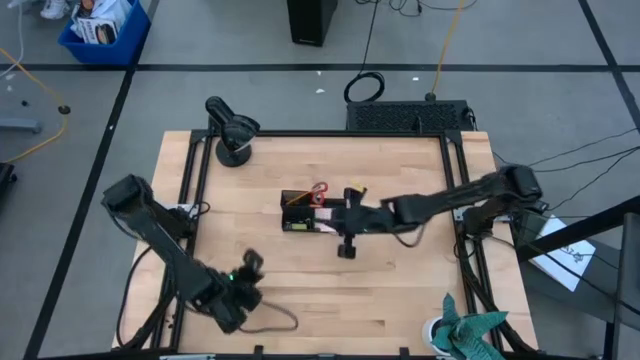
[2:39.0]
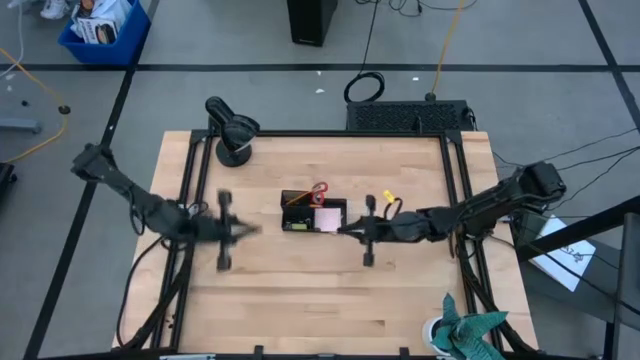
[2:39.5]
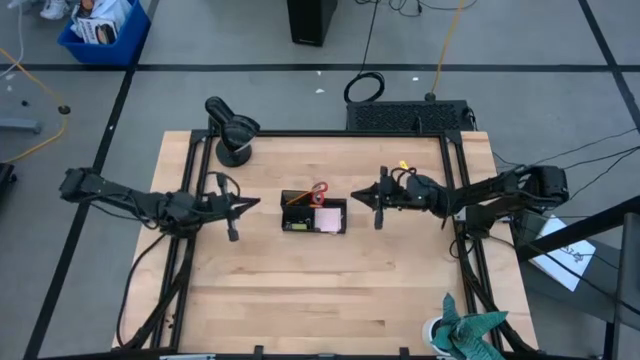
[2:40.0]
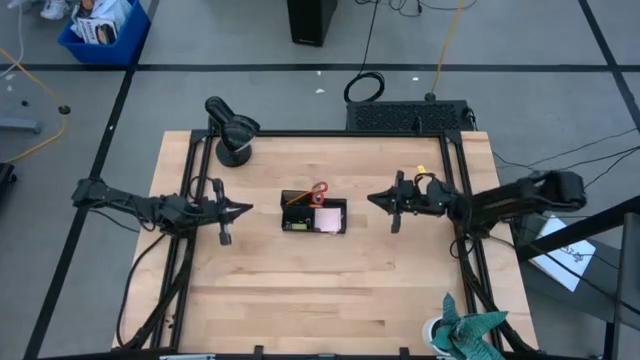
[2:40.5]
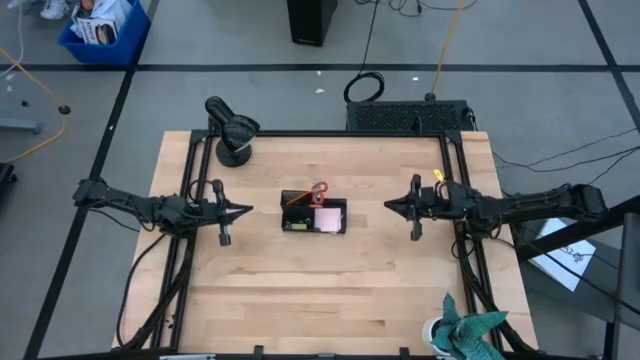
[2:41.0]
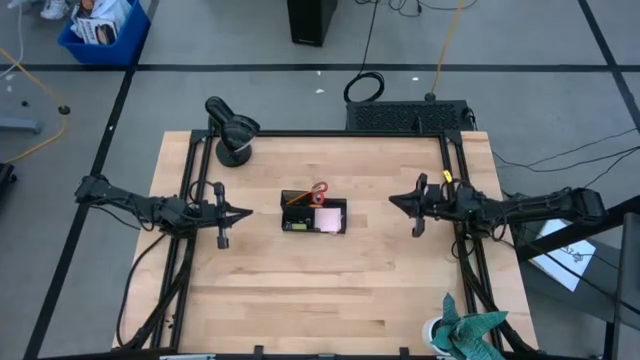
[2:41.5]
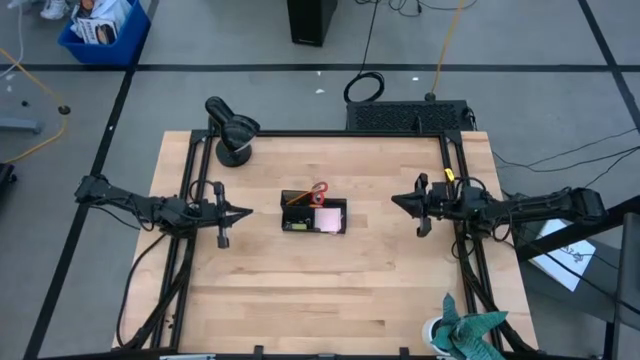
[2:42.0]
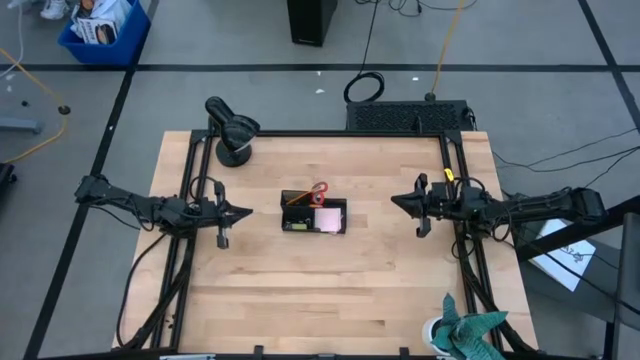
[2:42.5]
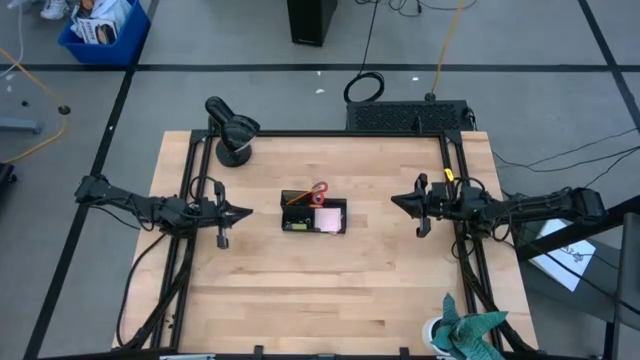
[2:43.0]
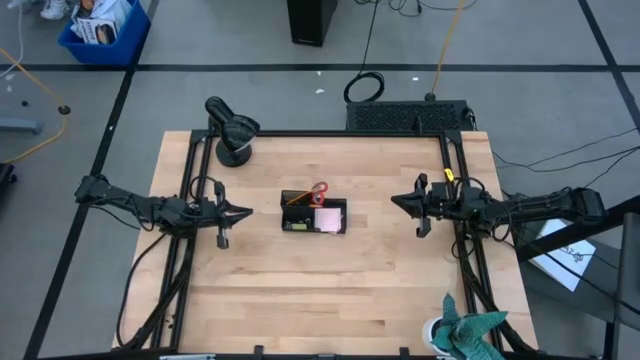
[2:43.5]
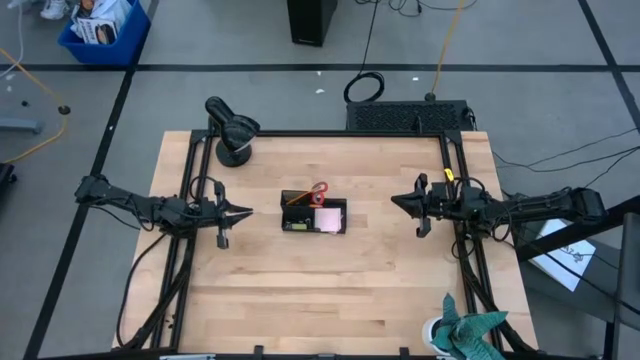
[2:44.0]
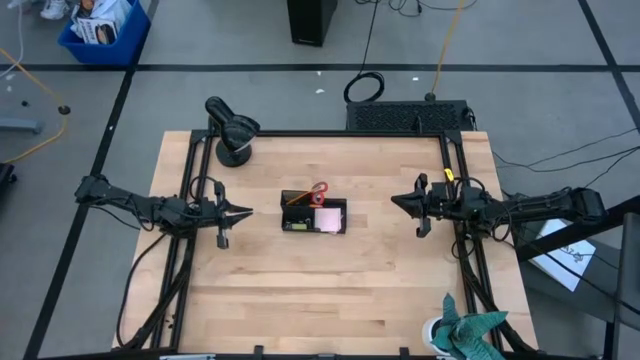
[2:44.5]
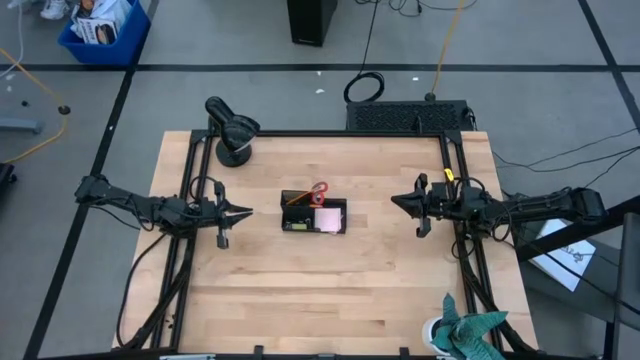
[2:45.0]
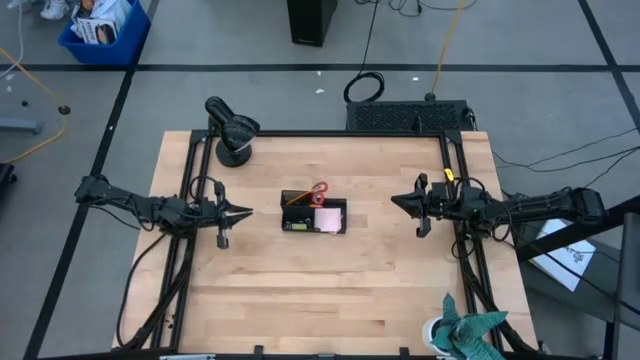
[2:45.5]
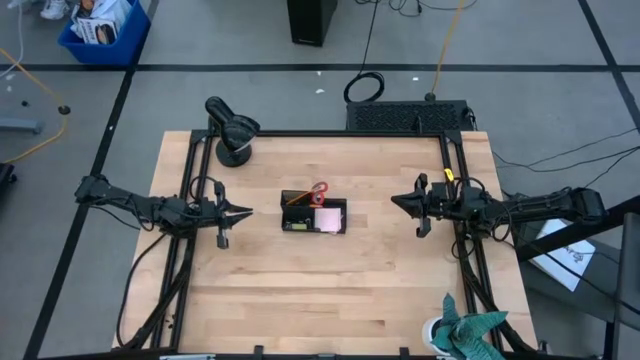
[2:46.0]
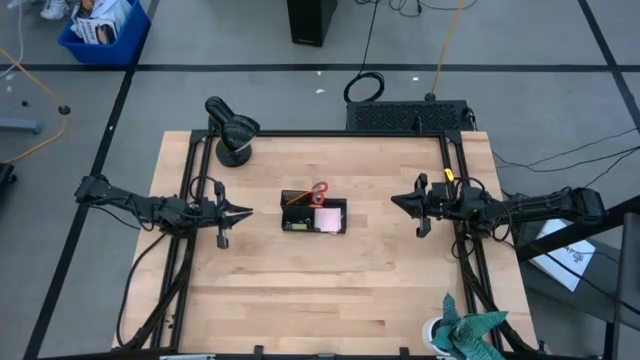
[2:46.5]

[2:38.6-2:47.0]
Task: Pick and place office supplies into organizer
Return to Home Position

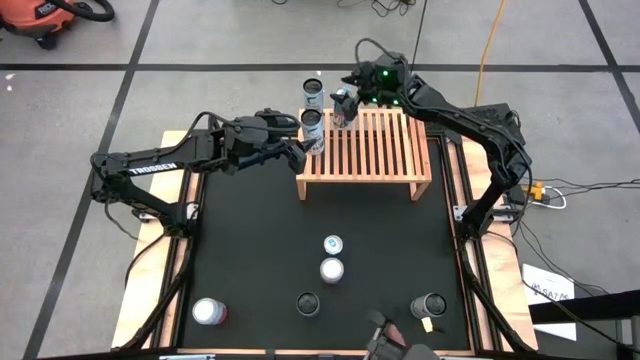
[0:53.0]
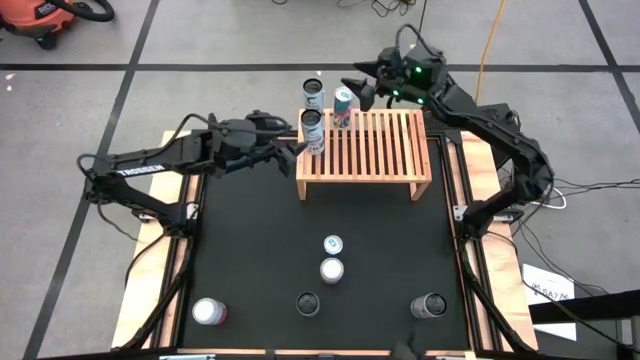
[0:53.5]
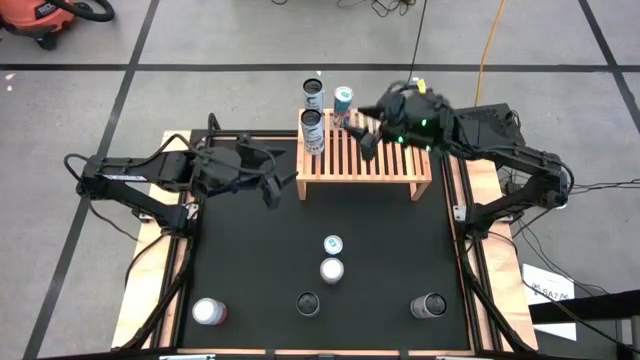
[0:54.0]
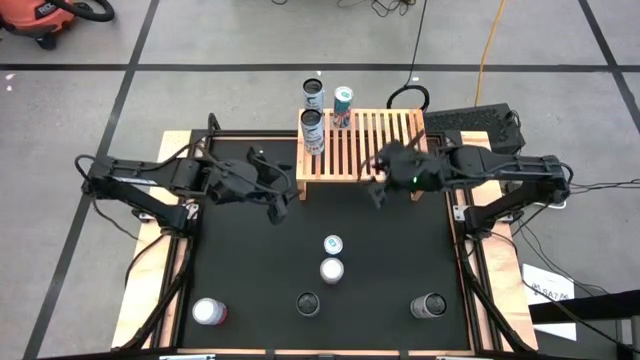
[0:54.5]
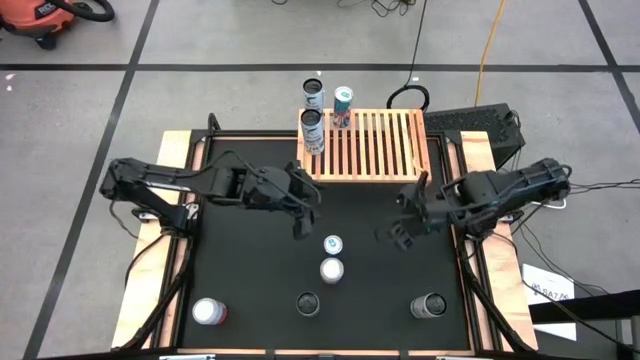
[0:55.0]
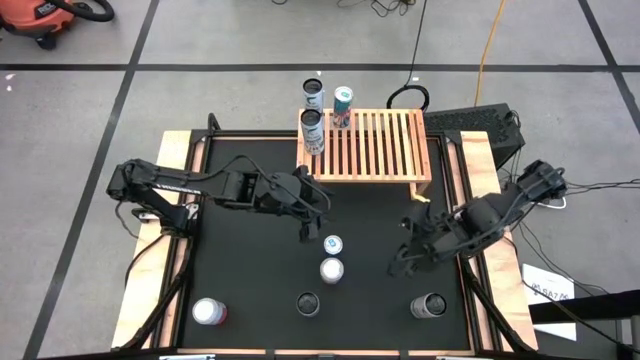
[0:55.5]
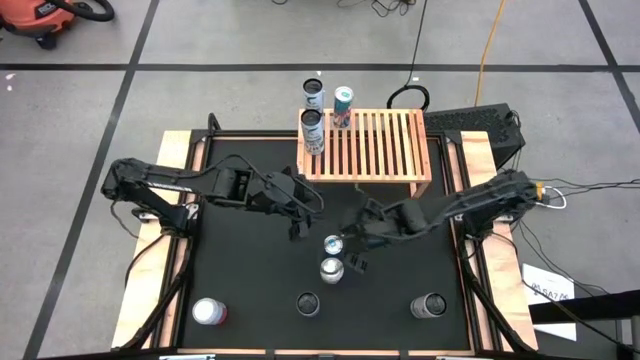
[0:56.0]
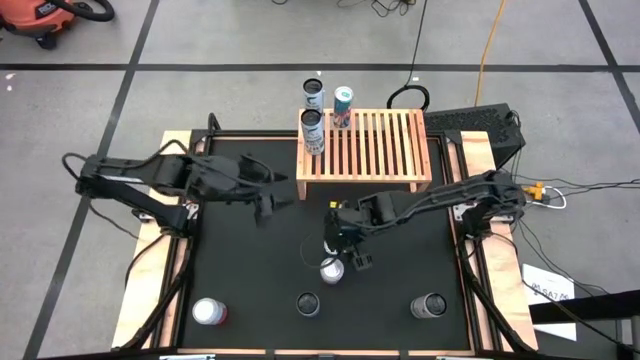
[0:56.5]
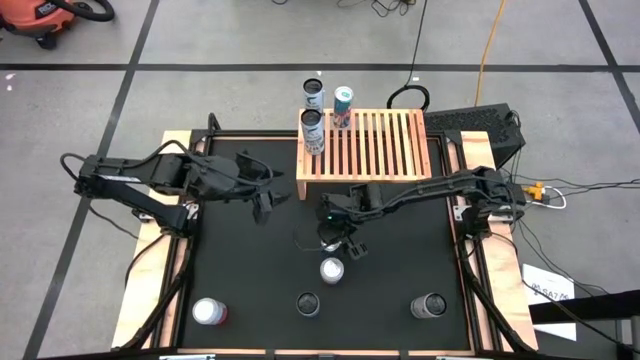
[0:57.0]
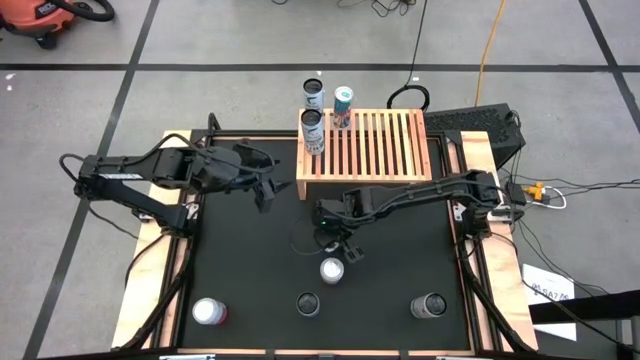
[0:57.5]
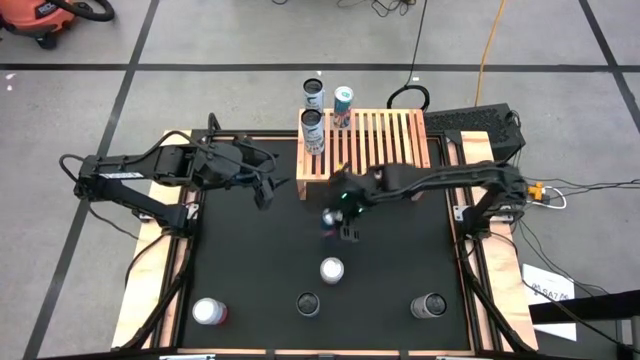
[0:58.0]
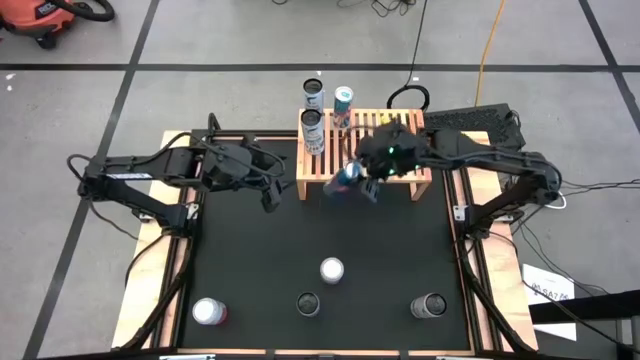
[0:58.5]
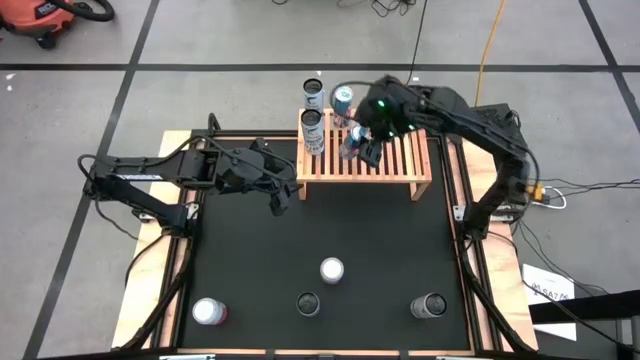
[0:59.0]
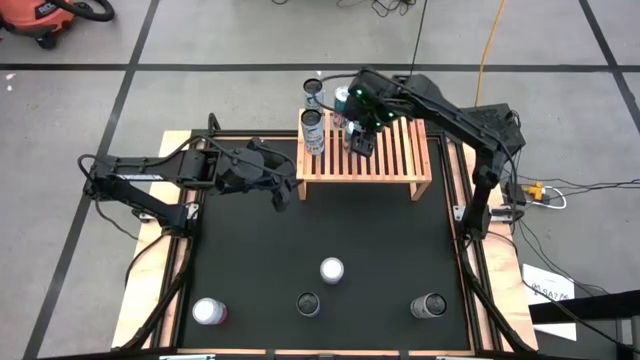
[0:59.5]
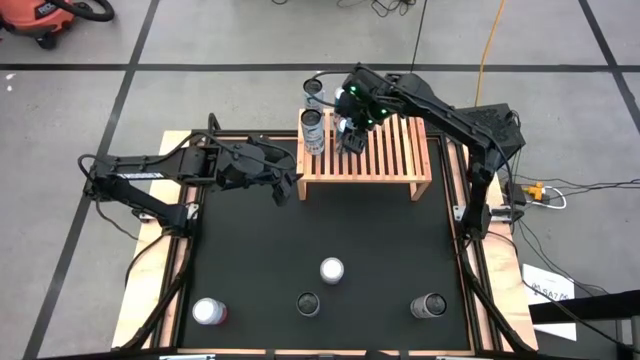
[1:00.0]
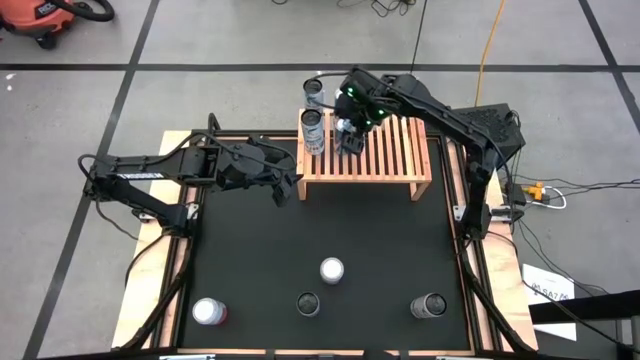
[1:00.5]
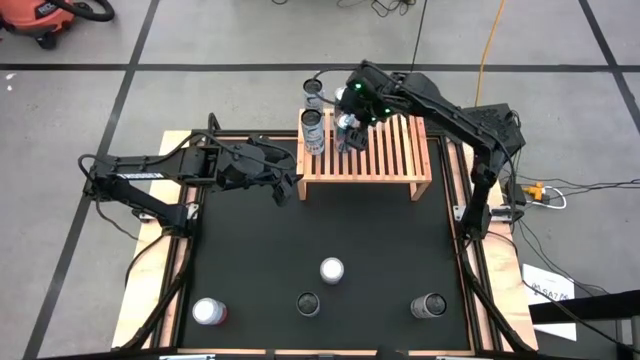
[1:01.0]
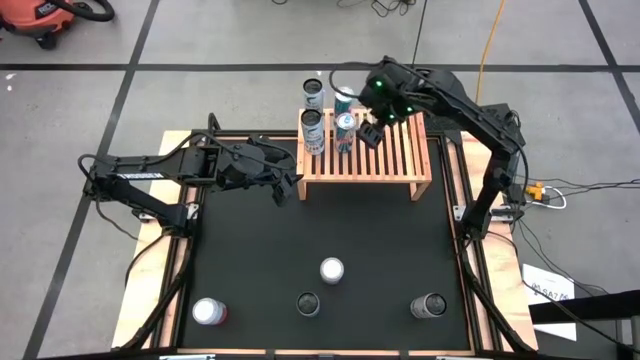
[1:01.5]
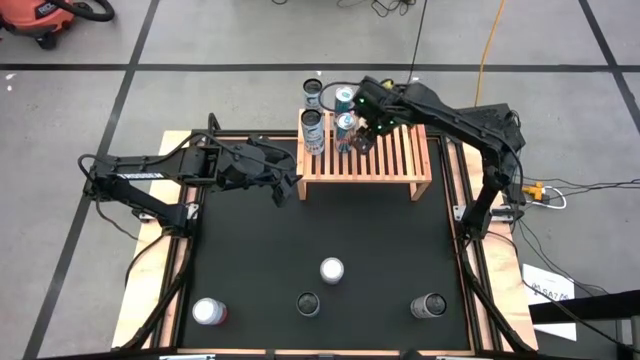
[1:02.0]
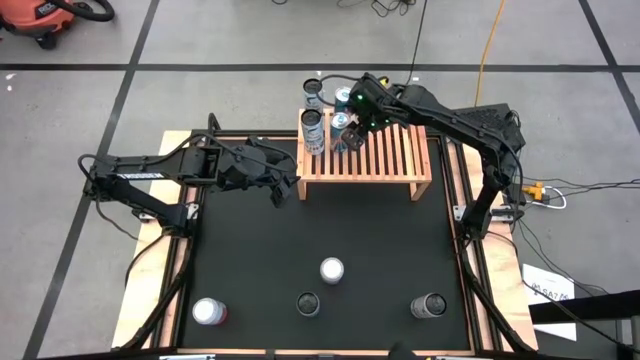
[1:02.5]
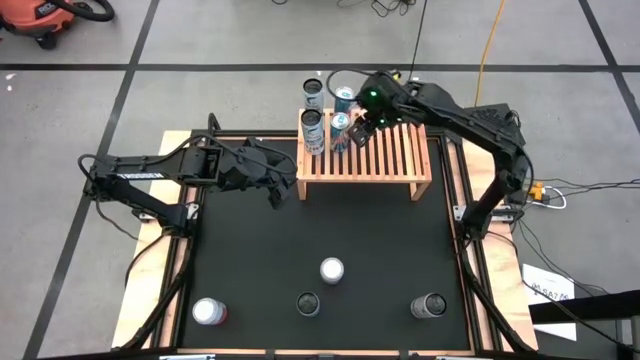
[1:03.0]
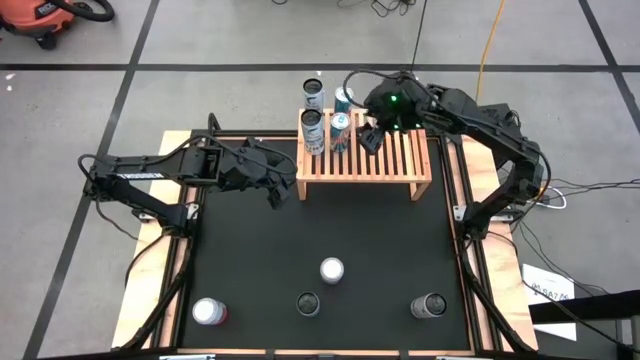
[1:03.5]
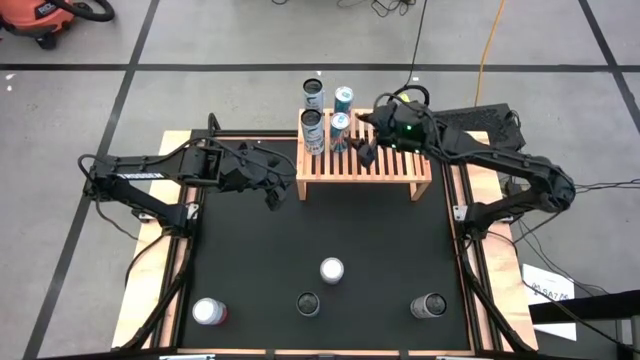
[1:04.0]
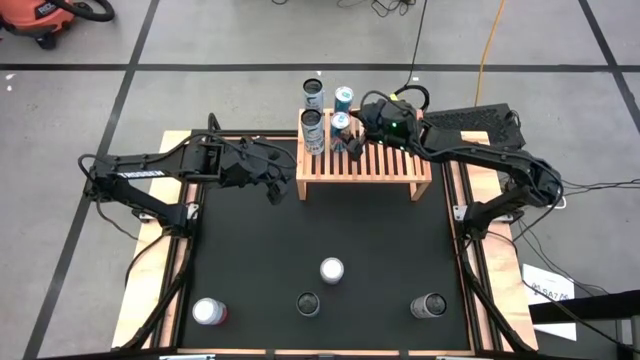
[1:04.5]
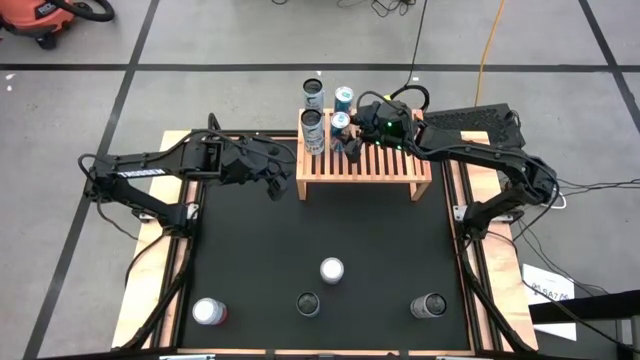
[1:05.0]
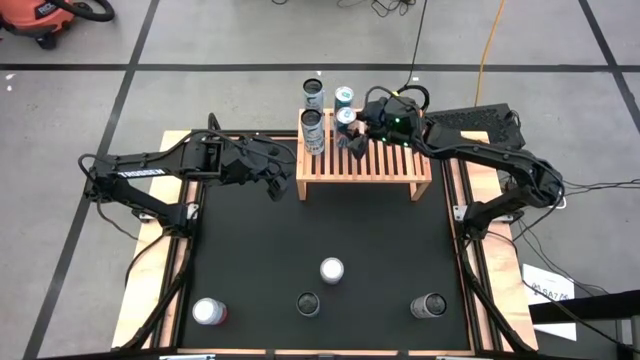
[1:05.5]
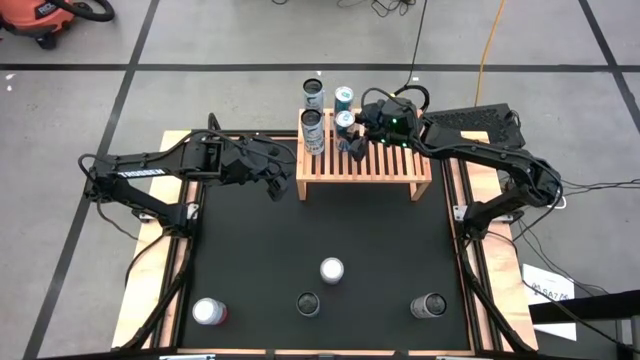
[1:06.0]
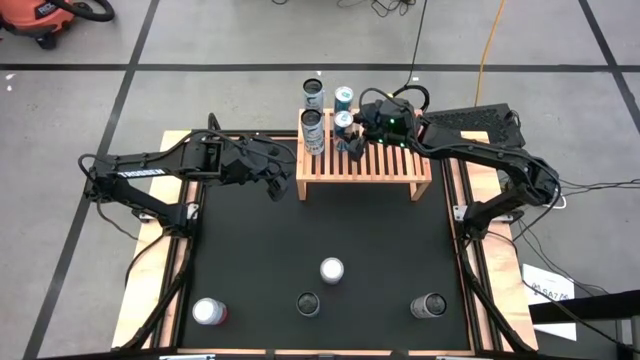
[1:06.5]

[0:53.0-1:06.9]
Task: Place canned beverage on shelf
Put the silver soda can on the shelf aligned with the other silver soda can
